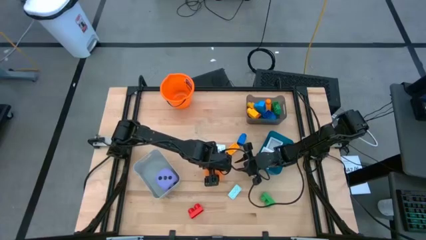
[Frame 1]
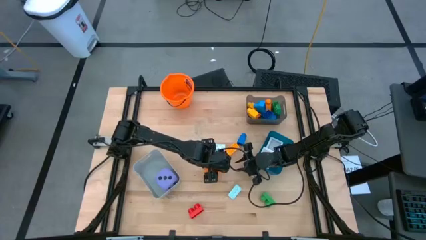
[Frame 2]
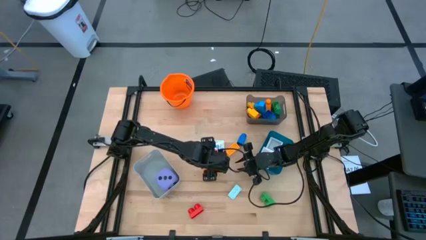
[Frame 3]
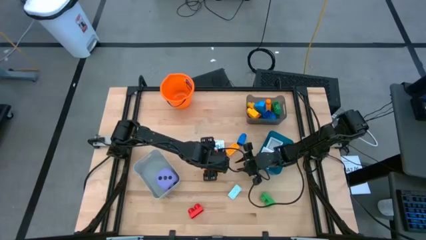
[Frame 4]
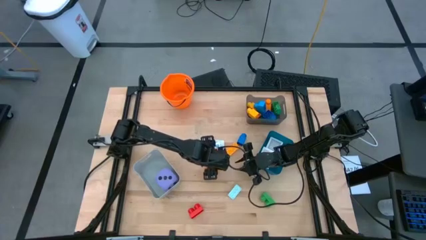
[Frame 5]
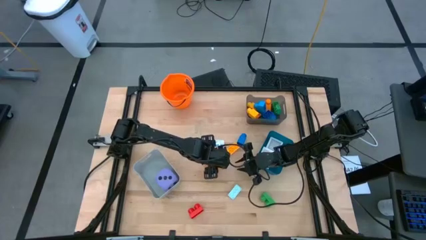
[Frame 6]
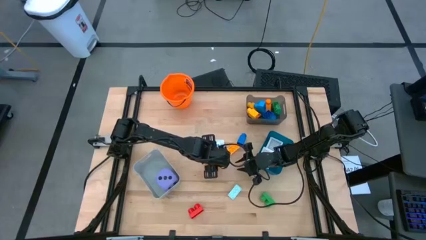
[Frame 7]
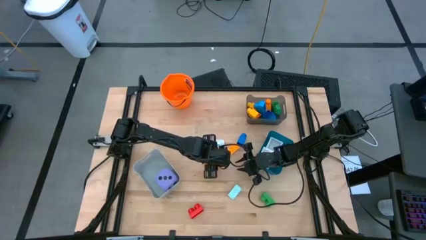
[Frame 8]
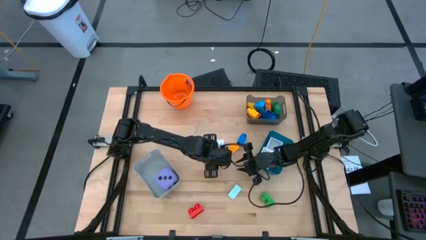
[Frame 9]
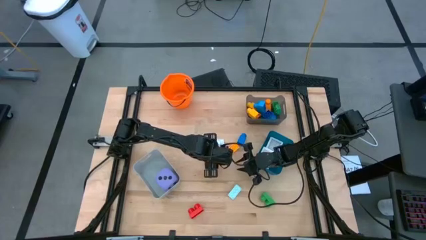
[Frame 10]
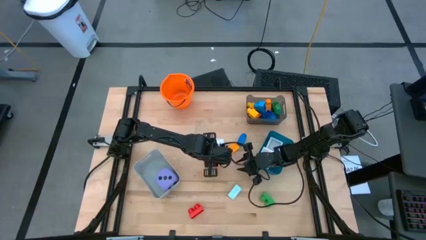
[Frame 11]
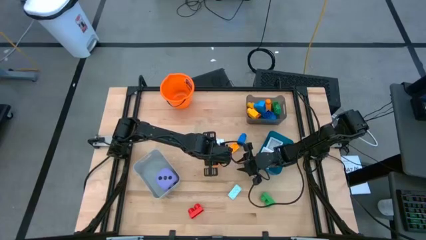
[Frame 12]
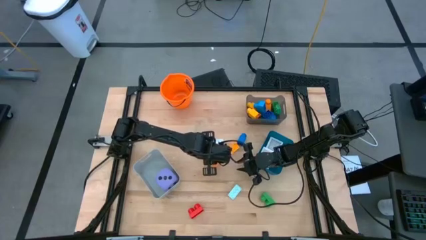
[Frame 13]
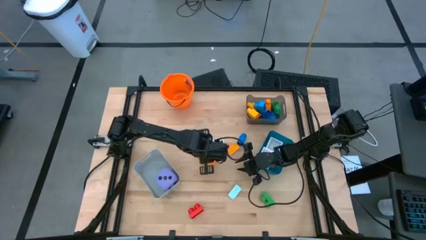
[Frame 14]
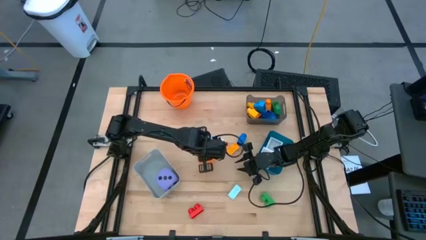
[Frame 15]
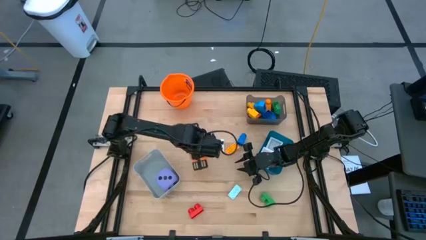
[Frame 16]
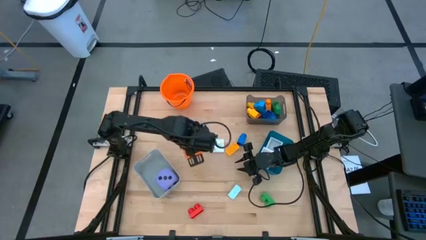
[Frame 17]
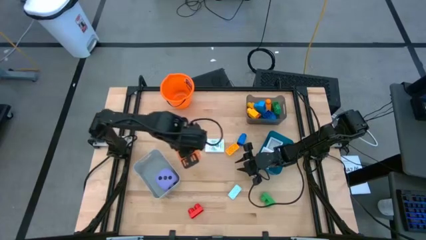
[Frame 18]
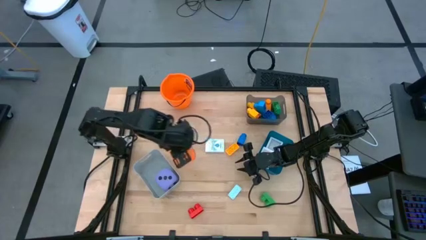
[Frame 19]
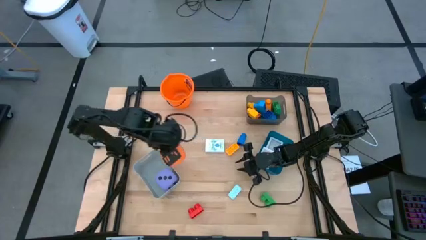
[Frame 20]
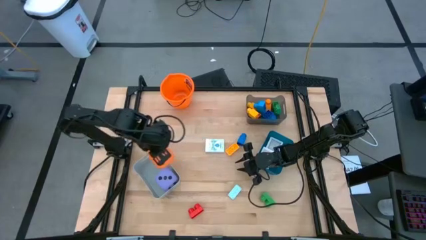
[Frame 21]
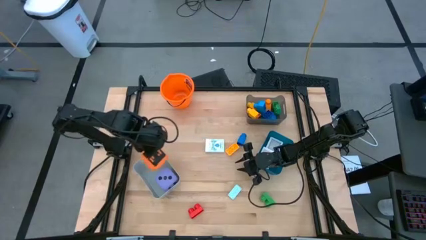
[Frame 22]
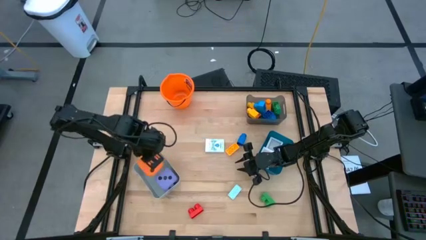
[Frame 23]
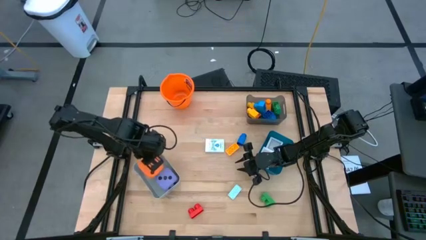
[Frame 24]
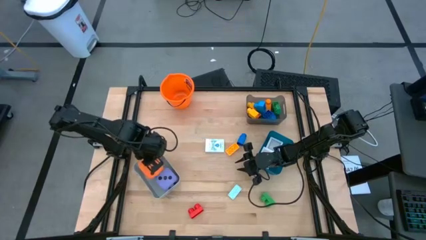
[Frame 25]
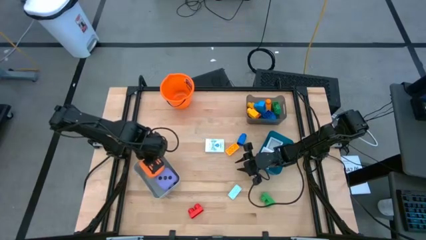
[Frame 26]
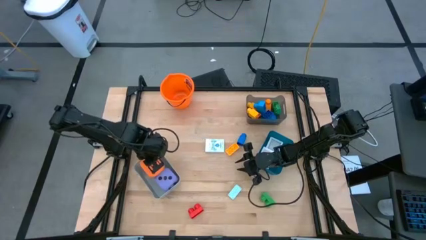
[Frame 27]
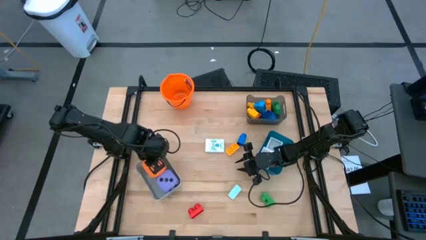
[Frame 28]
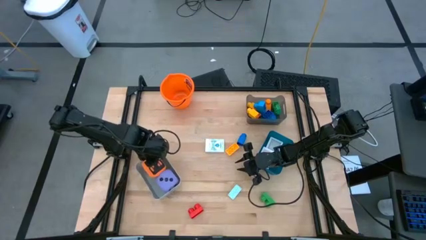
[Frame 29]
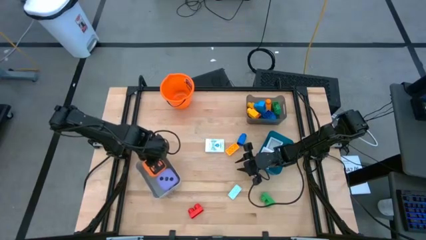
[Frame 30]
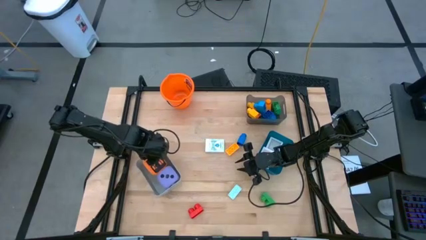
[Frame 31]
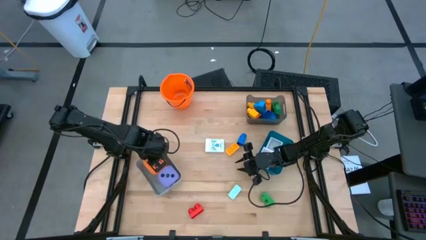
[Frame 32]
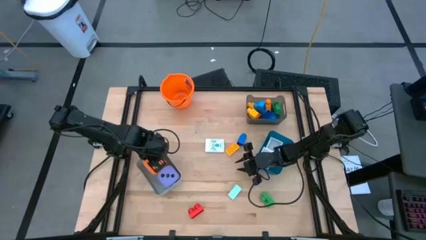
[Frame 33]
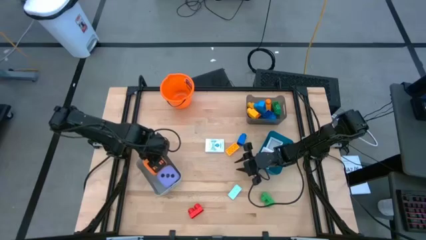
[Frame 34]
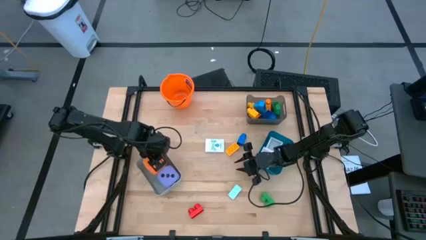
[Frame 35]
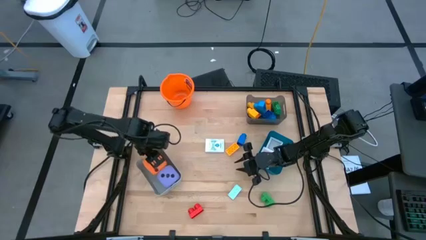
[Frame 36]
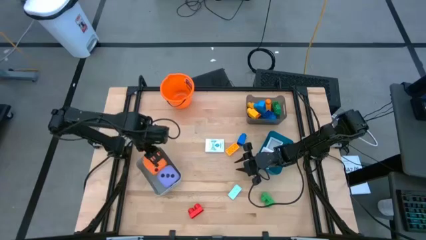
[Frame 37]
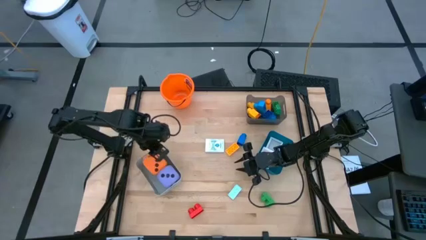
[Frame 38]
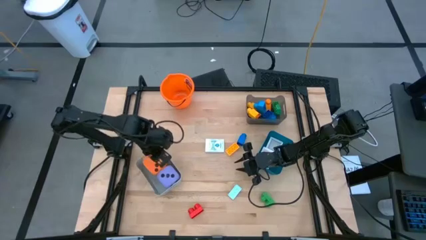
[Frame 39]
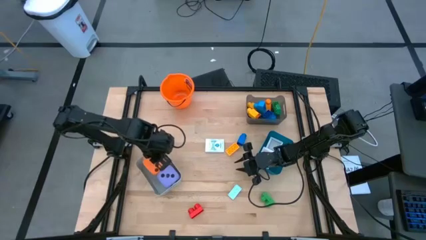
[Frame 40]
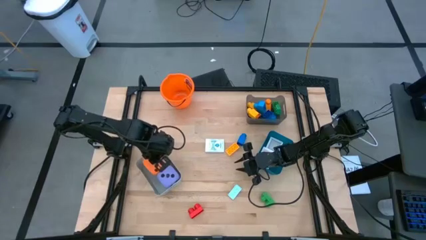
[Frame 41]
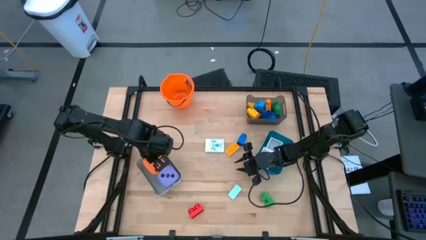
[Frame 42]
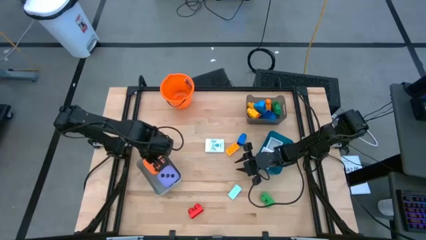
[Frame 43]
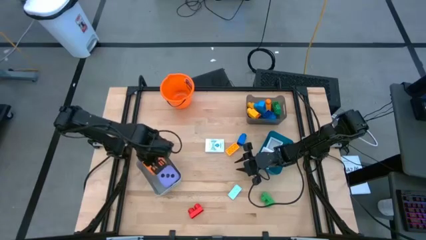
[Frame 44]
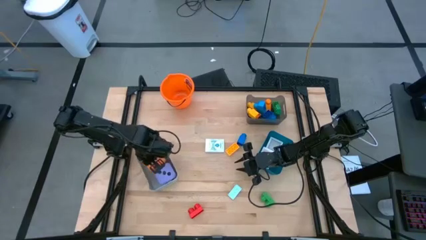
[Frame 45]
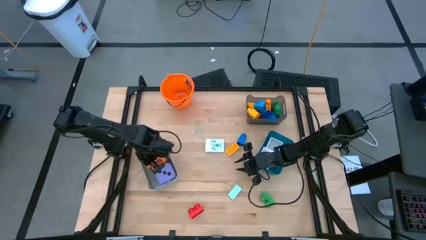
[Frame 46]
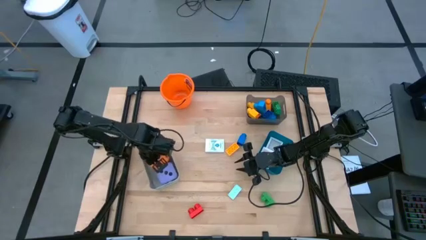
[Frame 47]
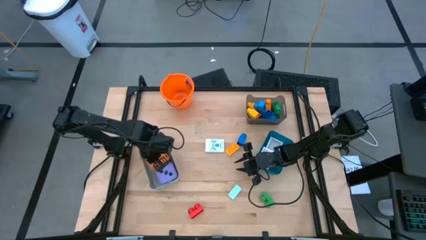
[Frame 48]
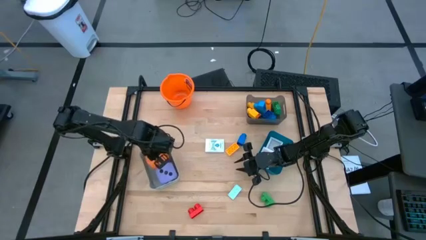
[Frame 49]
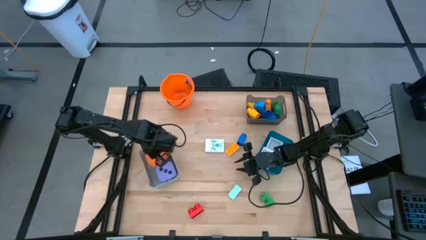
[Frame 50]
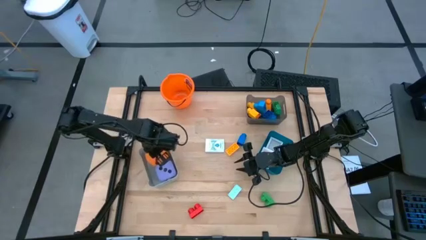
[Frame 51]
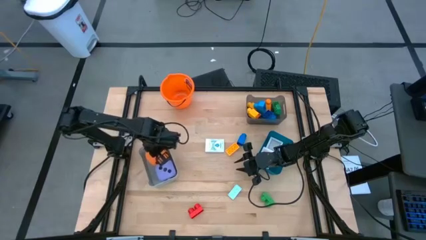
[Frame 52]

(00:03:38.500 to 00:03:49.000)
Task: Pick & Place Toys
Put the orange dice into the gray bin
